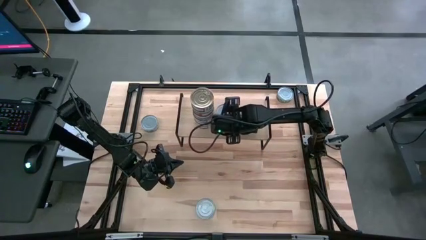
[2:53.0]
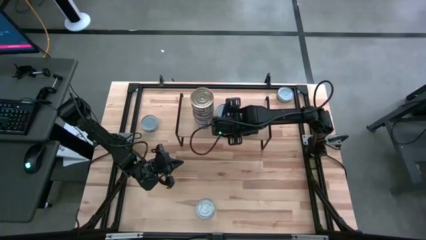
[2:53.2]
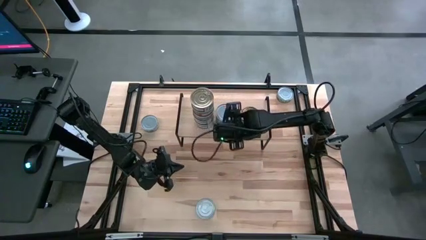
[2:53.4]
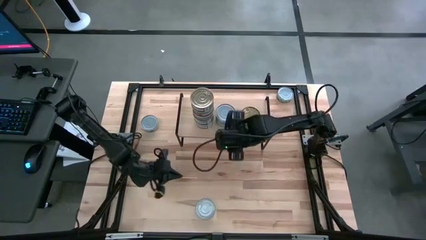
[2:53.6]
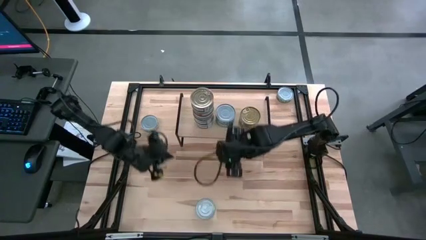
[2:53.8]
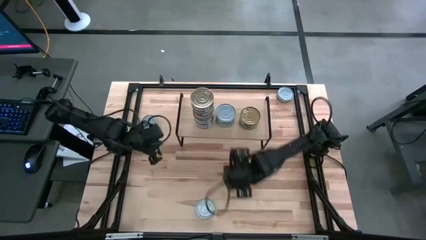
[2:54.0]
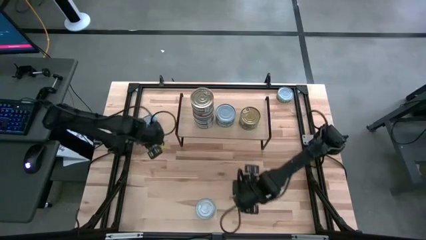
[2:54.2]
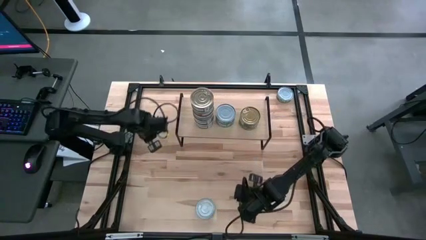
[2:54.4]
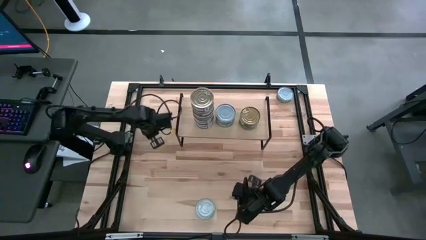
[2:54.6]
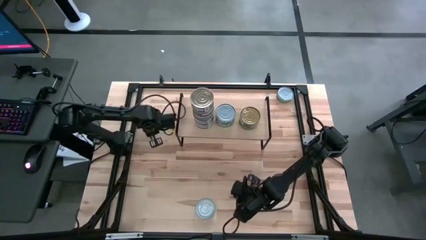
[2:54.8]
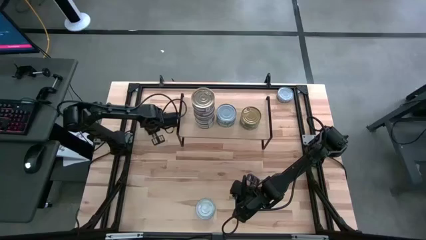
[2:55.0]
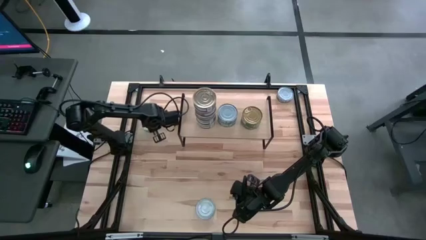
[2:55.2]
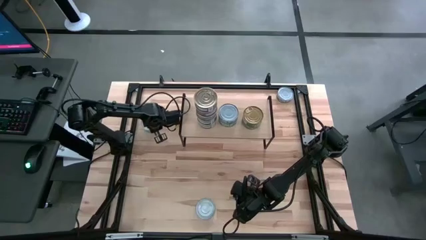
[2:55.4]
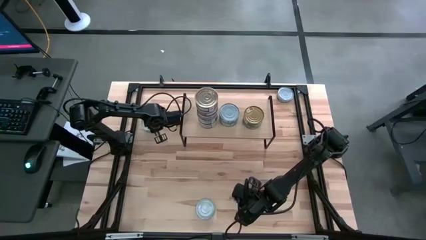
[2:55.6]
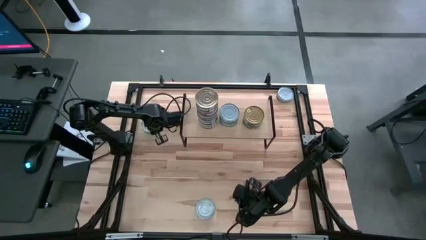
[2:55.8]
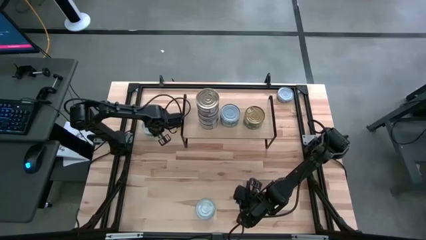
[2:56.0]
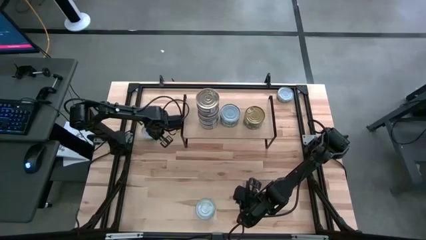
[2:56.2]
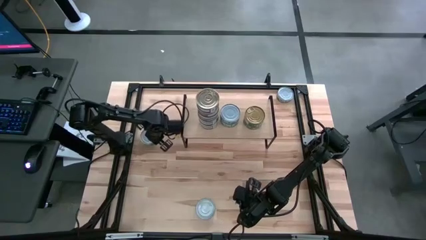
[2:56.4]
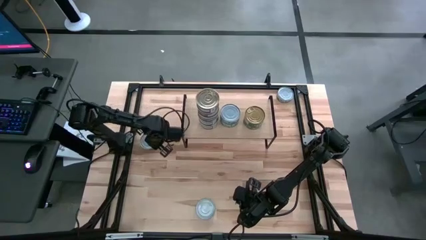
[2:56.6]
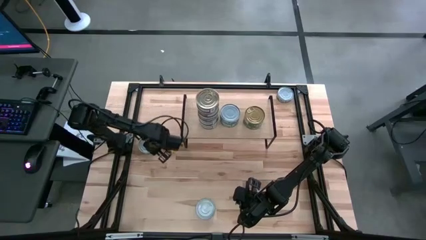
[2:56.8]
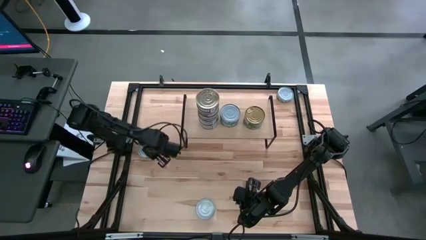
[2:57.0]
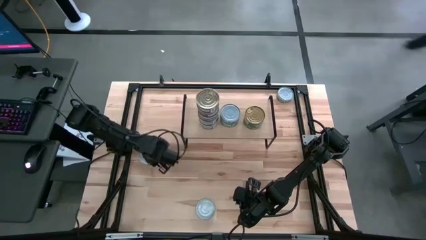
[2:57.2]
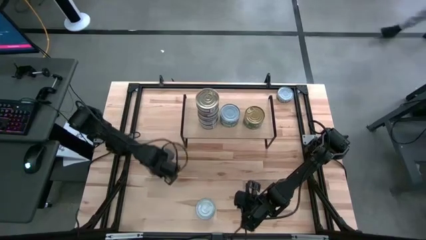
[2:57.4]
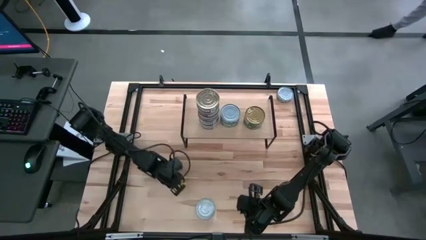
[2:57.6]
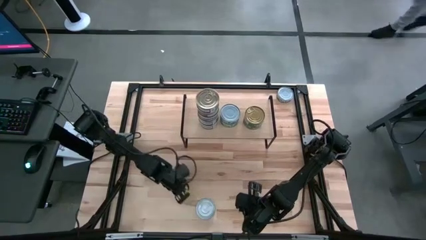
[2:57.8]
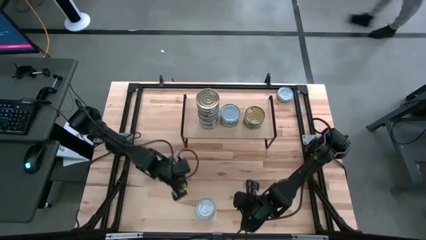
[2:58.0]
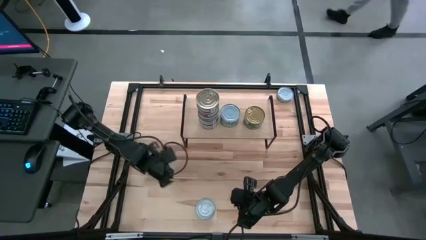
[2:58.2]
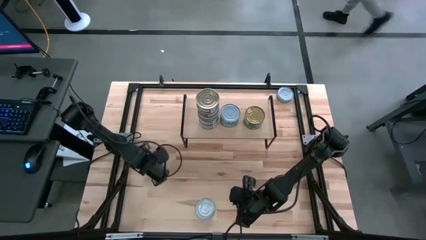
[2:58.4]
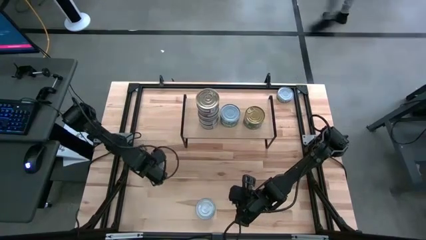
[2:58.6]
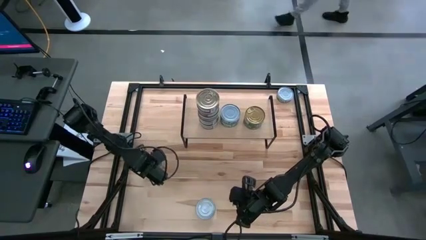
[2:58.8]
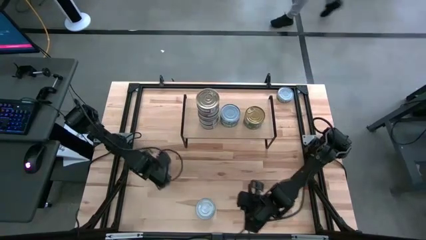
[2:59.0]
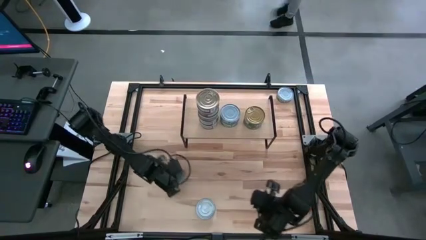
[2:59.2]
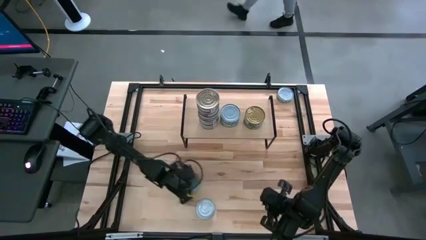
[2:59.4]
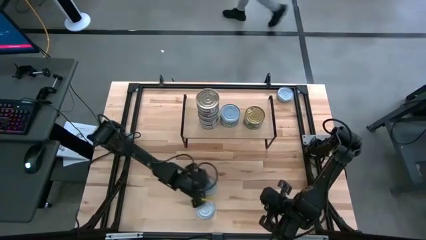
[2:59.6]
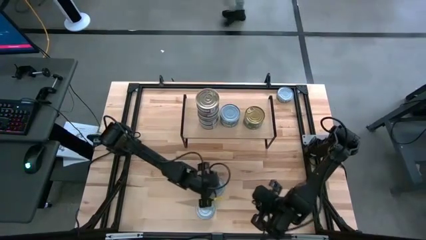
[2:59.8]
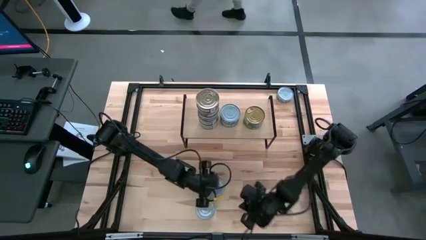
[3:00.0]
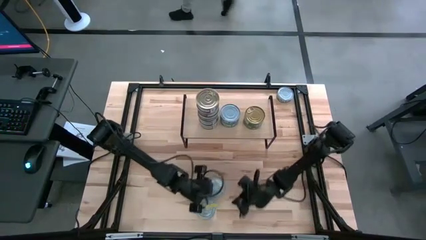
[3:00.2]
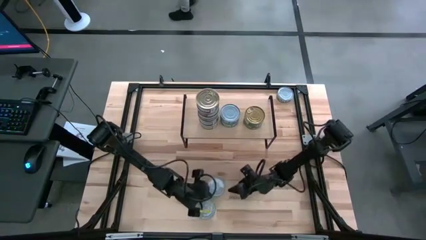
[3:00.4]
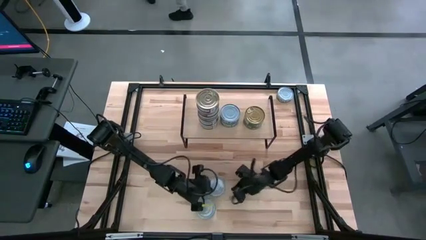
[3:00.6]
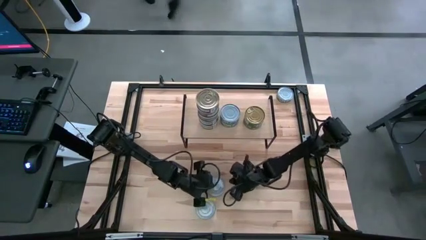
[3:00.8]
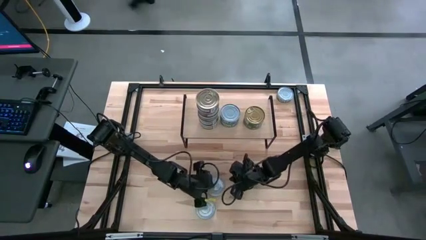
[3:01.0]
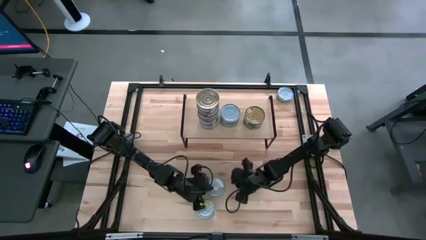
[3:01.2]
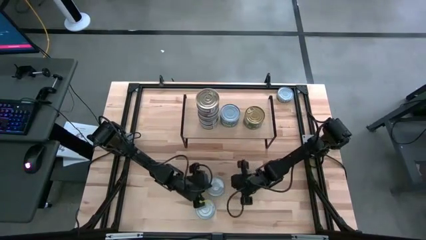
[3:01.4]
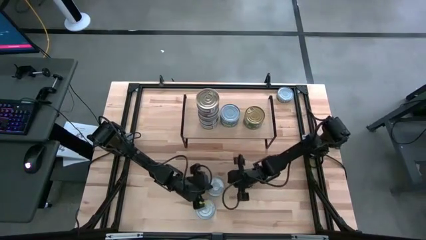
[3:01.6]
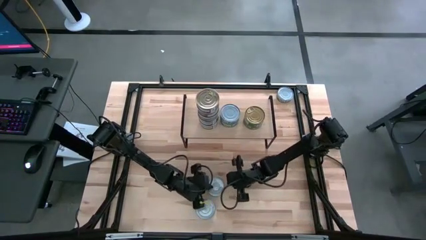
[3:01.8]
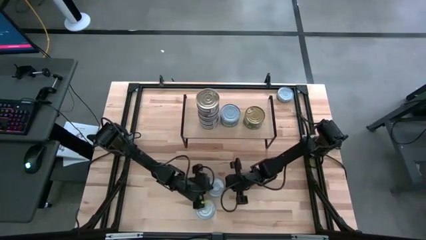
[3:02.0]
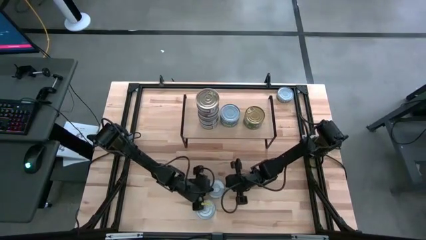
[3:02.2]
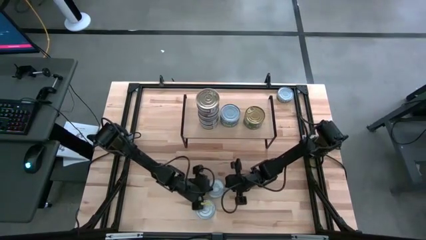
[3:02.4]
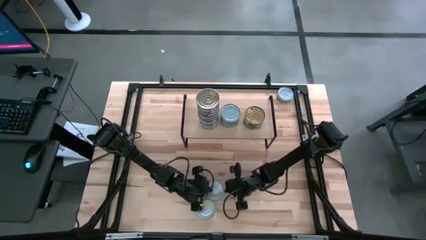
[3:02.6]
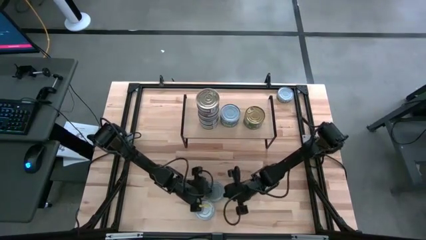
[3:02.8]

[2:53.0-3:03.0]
Task: Stack canned seafood by type on shelf
Stack the white-green tuna can on top of the white-green tuna can on the shelf

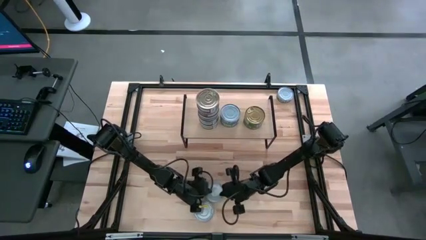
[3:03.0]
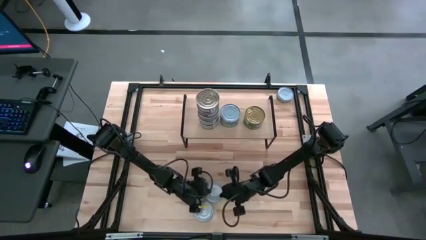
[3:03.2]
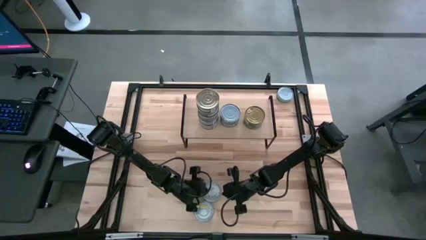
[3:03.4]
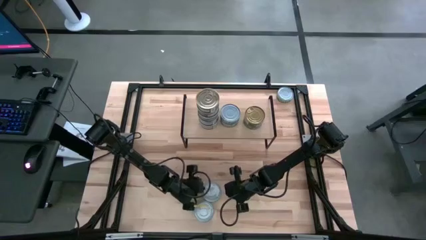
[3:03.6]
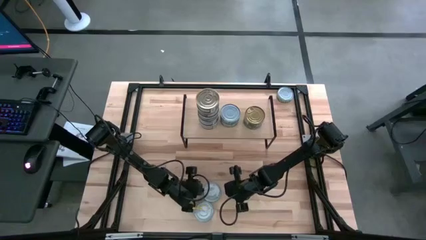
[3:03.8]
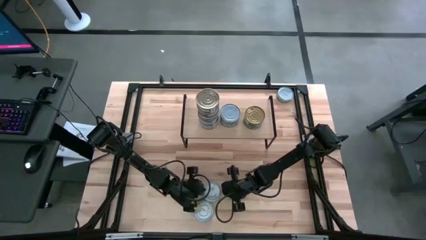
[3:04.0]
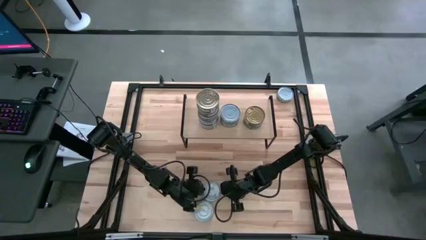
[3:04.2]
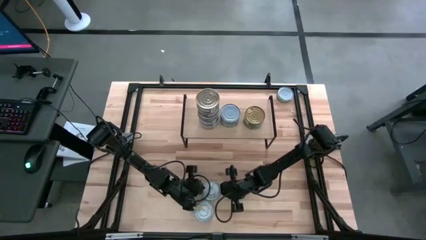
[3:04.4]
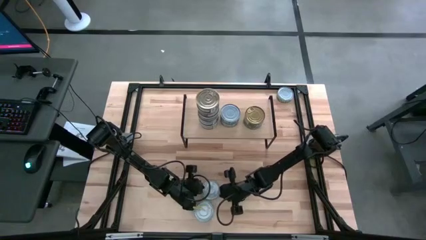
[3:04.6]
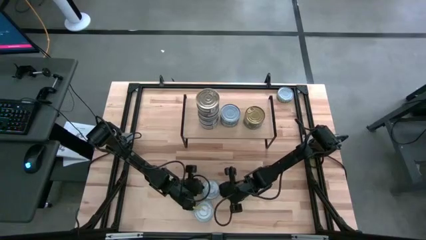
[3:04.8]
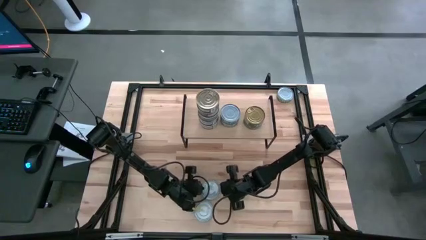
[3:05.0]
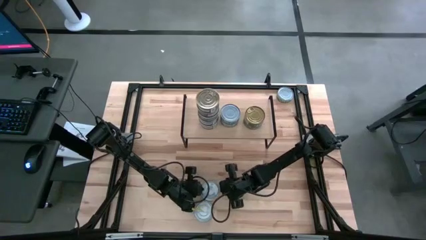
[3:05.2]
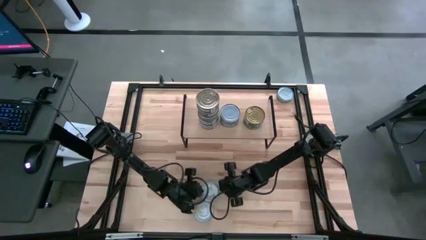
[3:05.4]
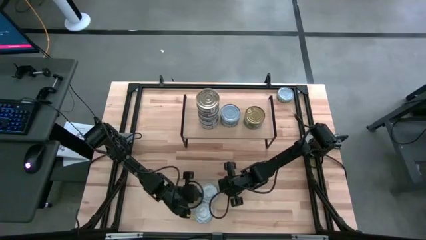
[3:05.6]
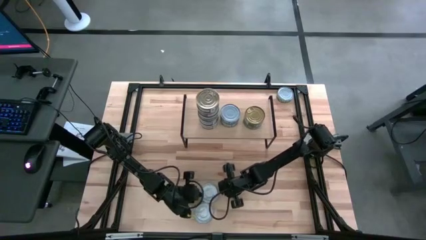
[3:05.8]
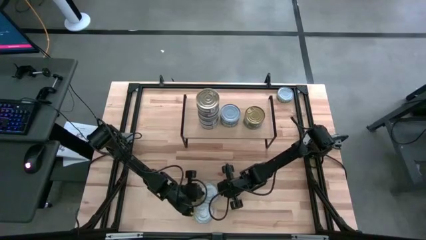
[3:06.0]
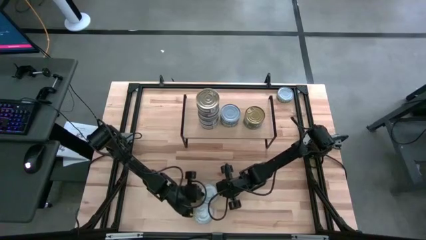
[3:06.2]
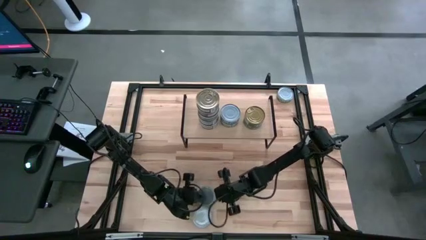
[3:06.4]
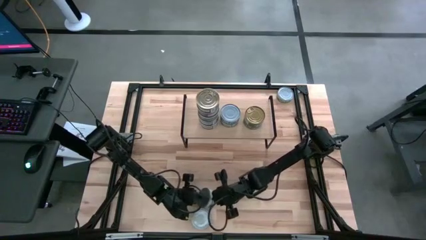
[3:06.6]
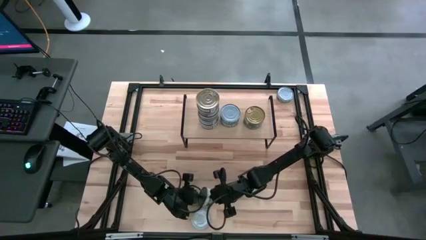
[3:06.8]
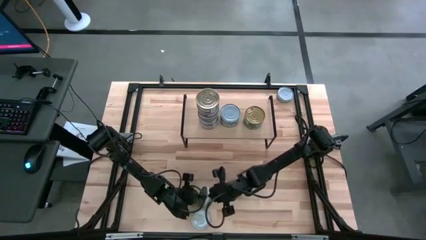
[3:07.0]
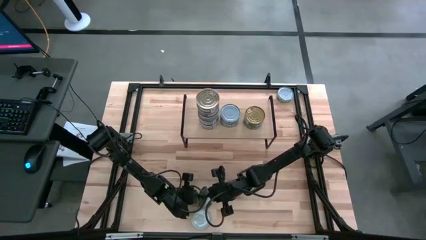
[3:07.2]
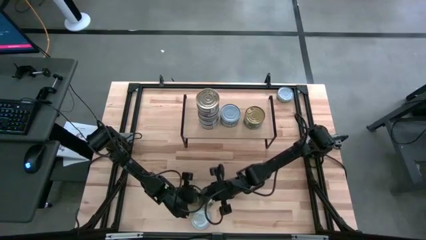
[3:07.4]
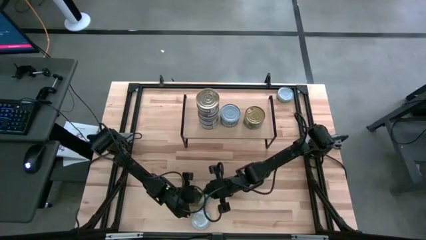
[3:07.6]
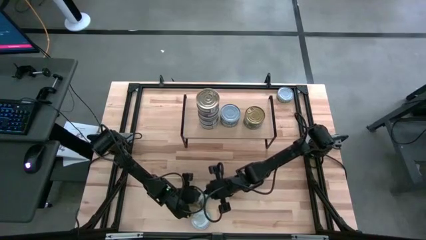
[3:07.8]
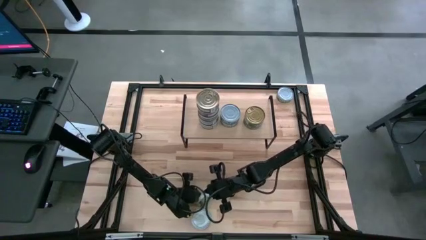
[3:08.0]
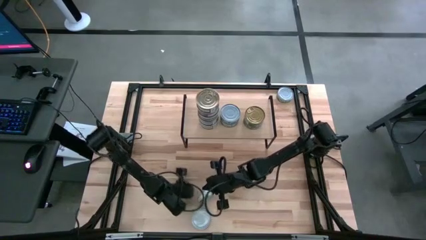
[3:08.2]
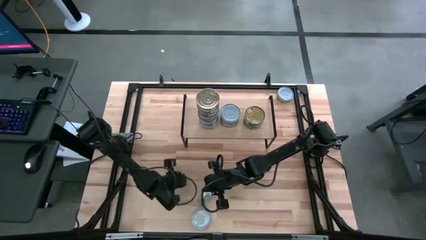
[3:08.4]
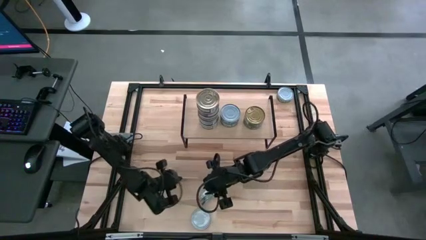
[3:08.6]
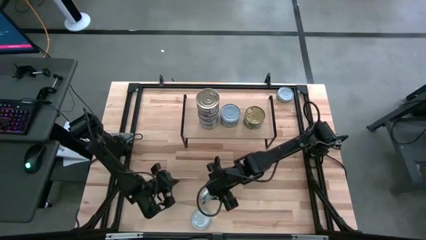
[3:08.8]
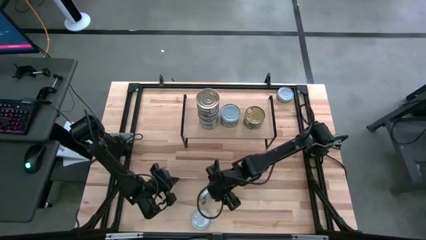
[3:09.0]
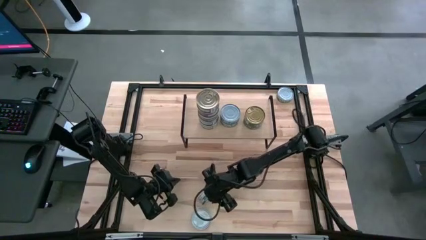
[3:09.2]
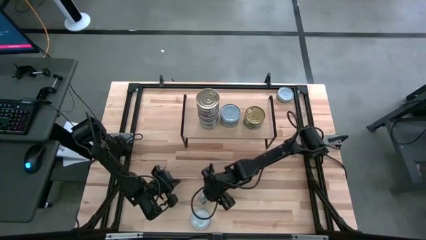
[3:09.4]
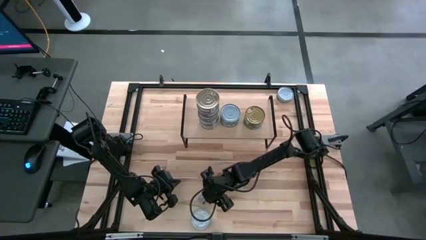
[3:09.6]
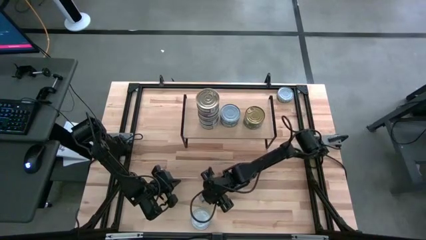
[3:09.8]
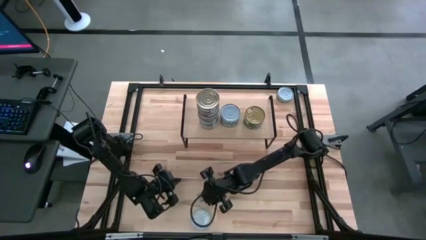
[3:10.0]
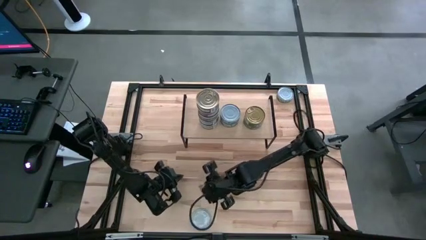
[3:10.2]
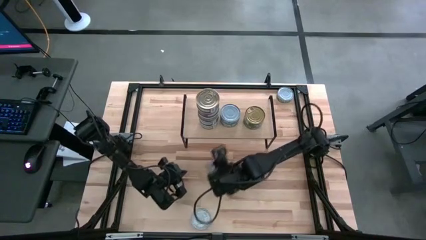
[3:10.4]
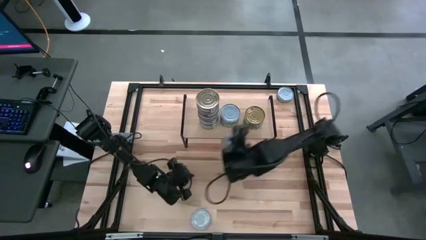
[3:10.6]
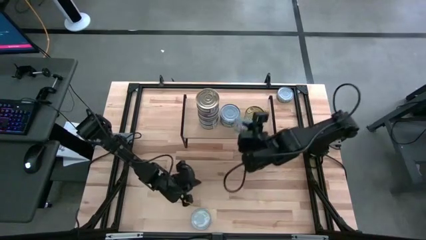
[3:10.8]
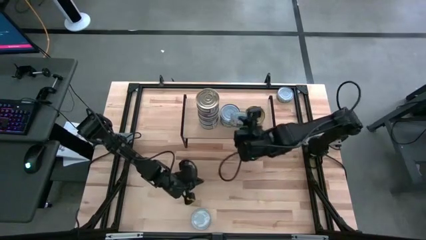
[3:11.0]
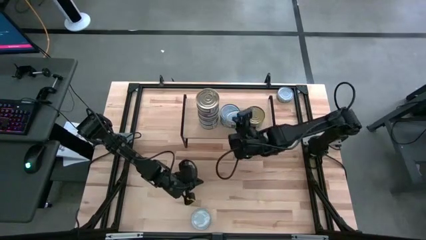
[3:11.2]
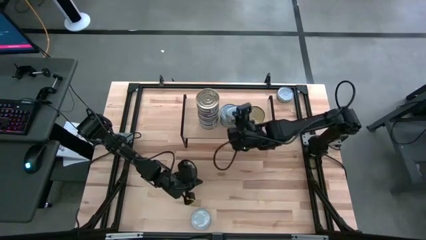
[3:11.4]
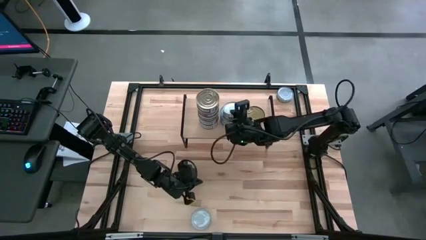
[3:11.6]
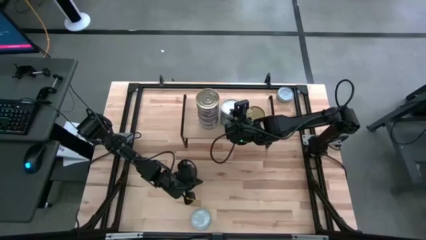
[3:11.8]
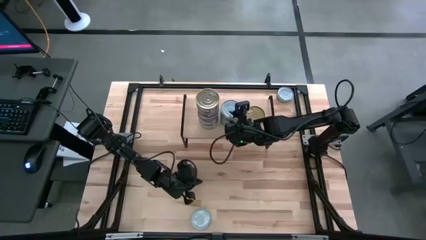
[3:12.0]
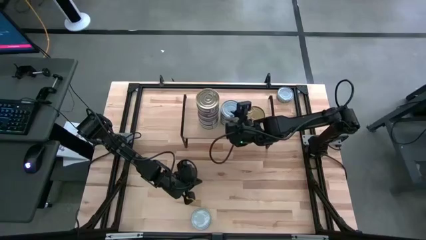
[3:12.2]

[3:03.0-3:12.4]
Stack the white-green tuna can on top of the white-green tuna can on the shelf
